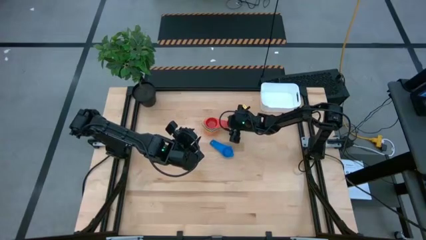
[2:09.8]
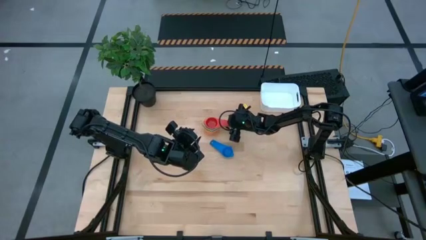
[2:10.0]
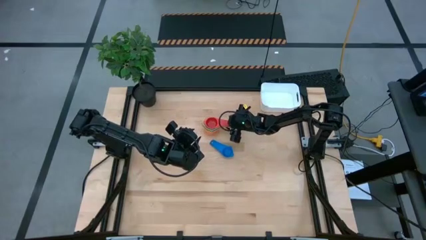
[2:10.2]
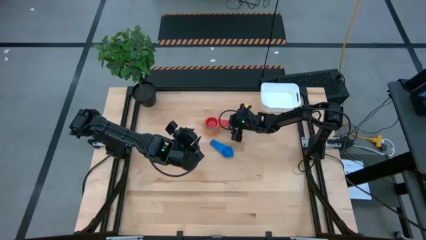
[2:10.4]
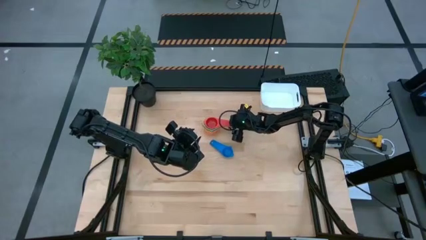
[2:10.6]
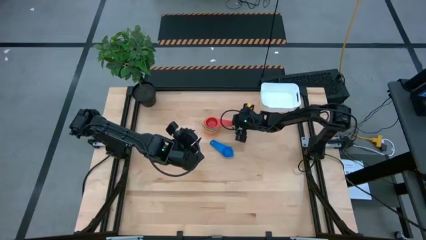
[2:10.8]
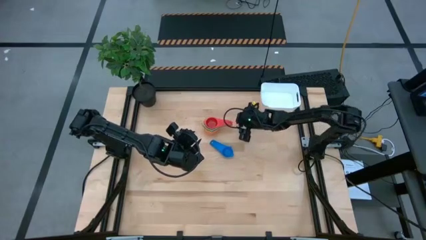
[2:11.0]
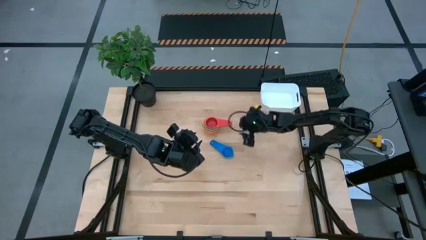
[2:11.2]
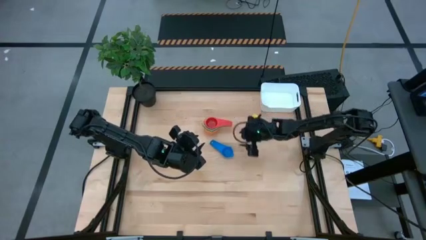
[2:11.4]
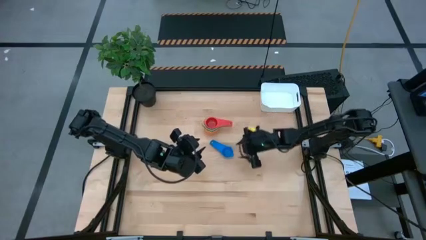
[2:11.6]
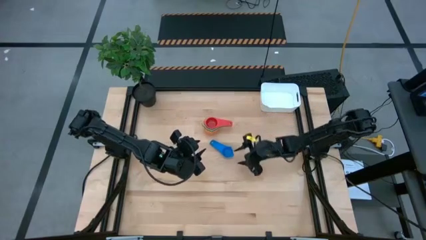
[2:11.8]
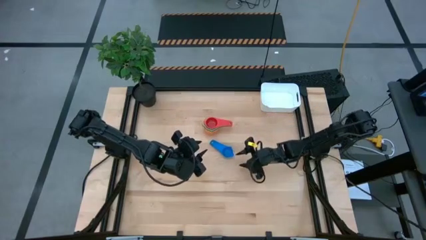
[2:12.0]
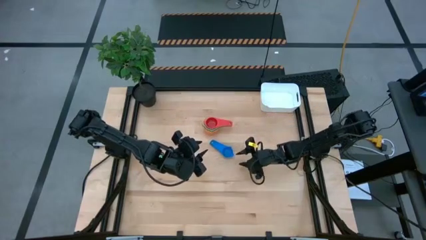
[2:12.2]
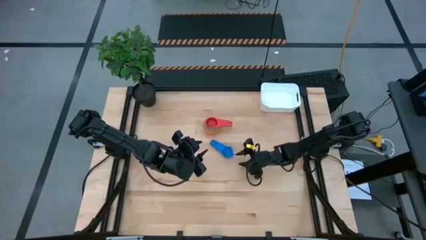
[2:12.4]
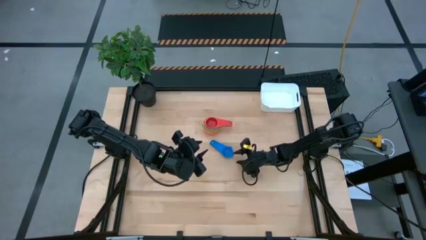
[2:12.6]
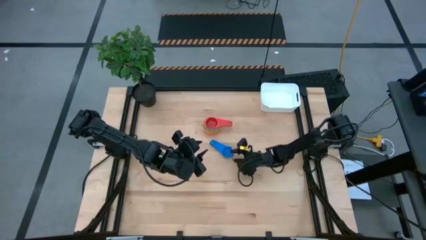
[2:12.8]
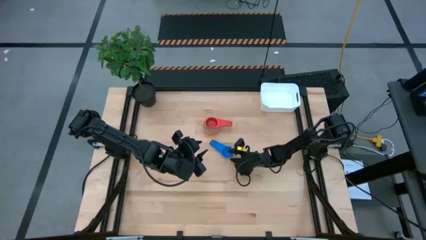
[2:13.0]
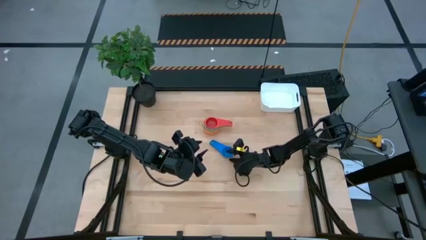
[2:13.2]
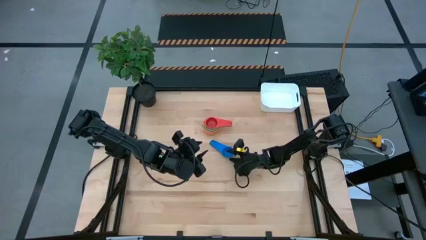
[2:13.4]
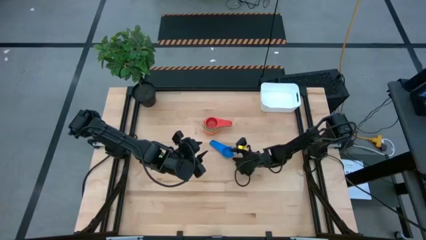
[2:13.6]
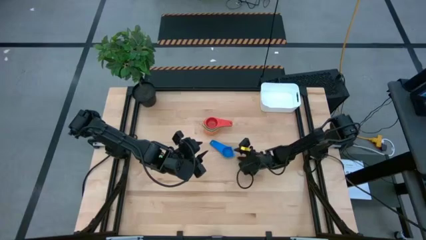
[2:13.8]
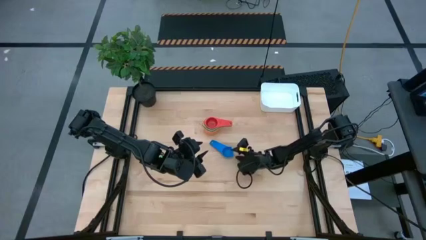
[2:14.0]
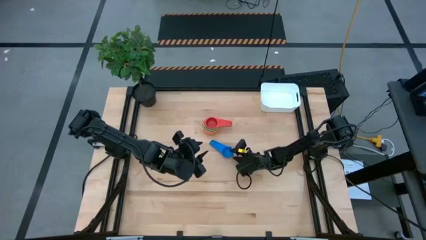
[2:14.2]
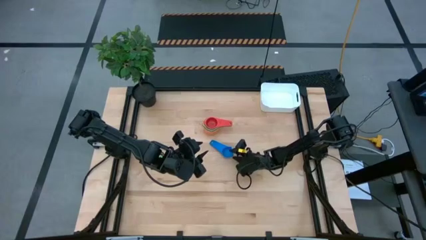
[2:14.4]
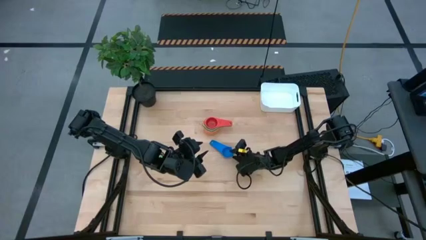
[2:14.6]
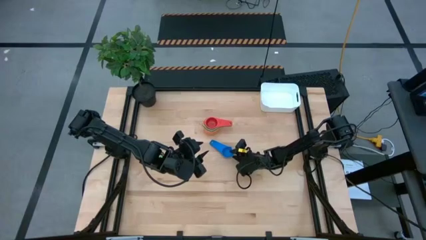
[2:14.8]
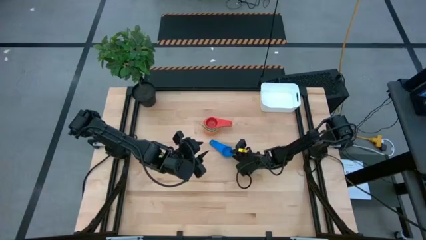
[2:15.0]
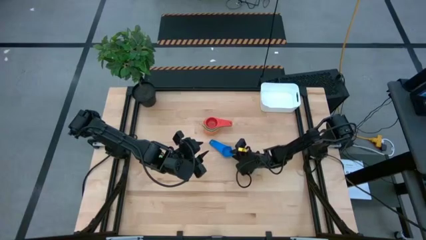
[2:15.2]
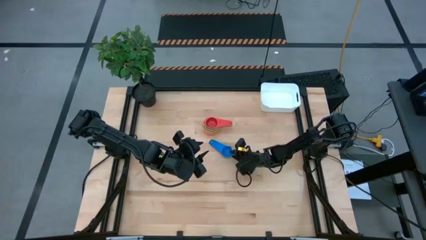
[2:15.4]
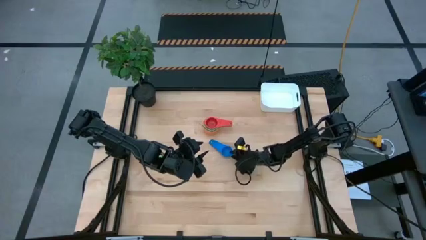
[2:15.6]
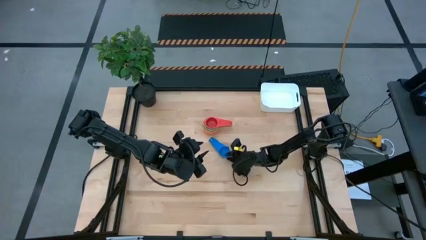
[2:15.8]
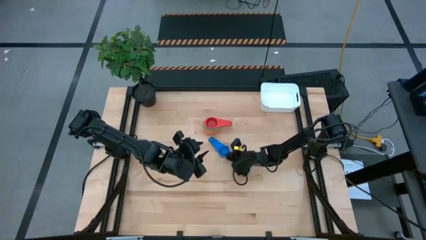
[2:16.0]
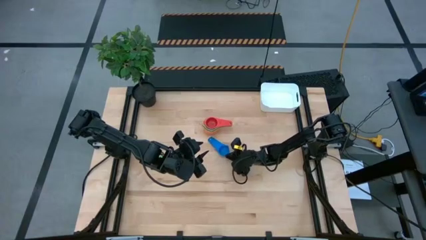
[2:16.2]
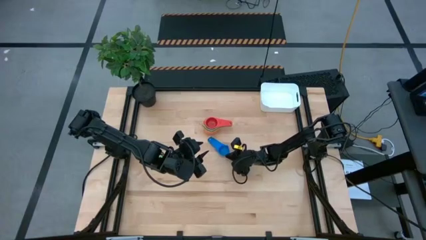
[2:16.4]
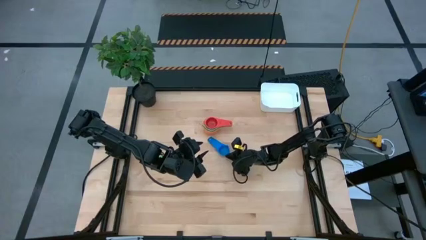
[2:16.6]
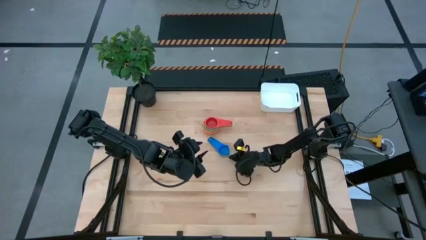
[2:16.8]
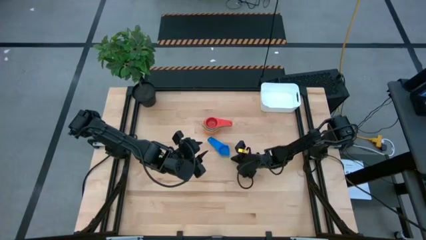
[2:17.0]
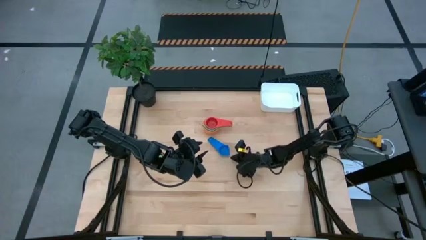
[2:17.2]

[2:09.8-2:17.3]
Task: Nest measuring cups in basket
Stack the blue measuring cup into the red measuring cup

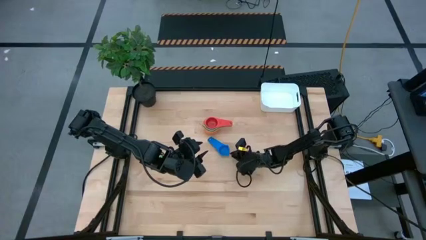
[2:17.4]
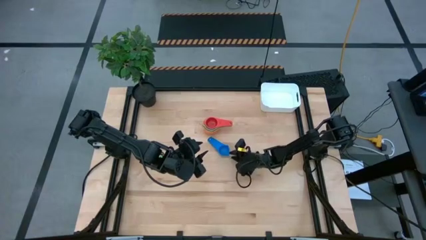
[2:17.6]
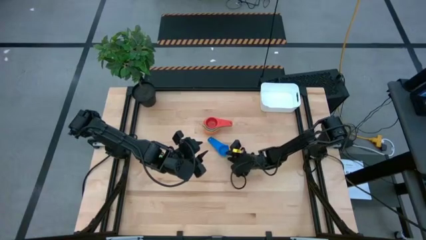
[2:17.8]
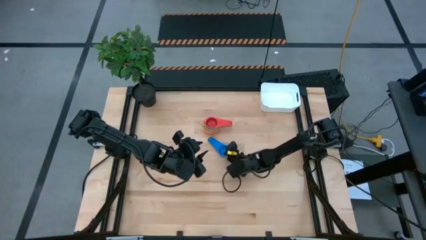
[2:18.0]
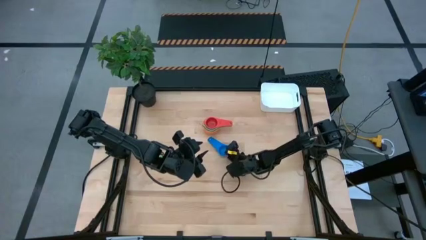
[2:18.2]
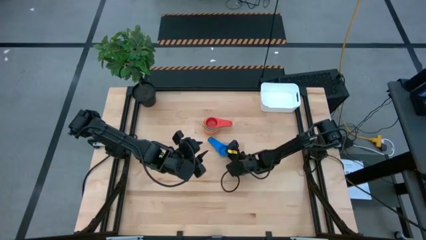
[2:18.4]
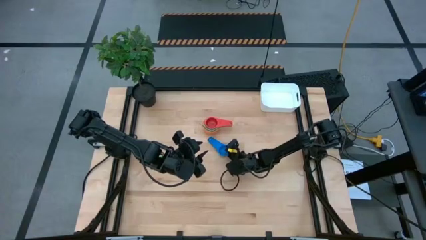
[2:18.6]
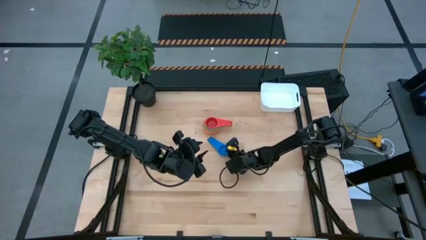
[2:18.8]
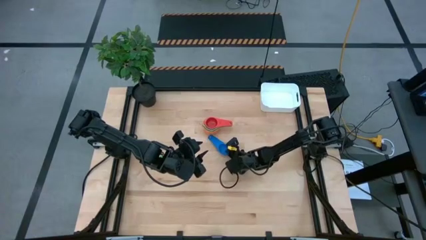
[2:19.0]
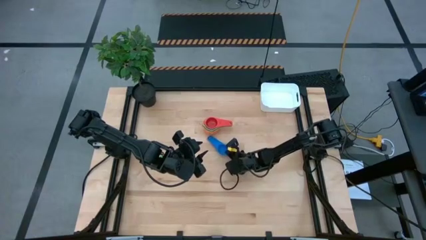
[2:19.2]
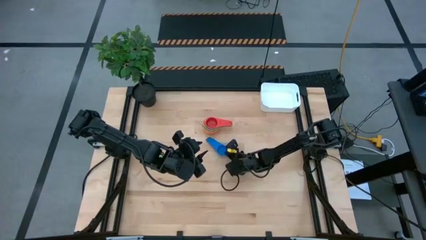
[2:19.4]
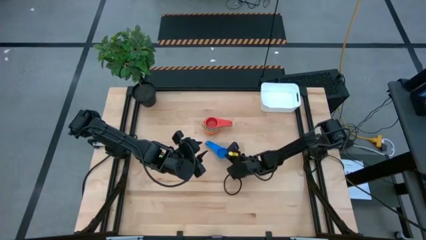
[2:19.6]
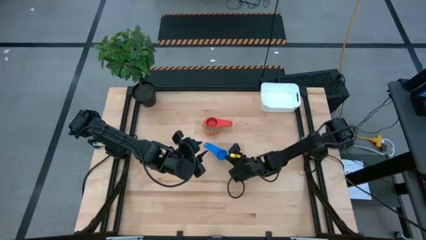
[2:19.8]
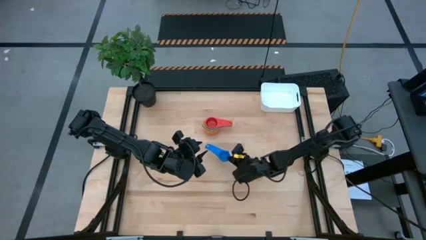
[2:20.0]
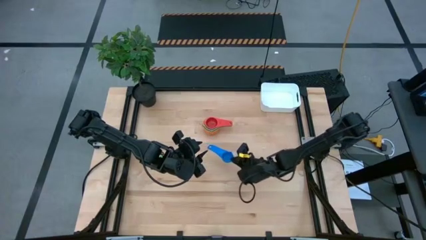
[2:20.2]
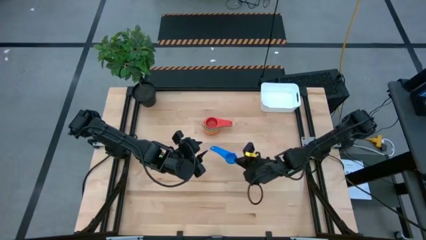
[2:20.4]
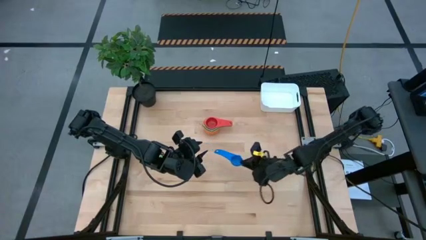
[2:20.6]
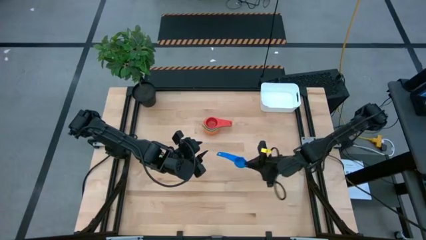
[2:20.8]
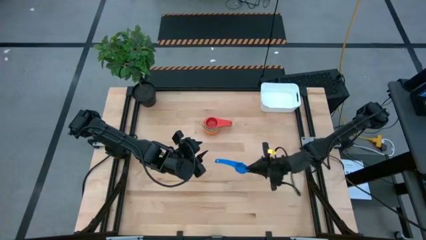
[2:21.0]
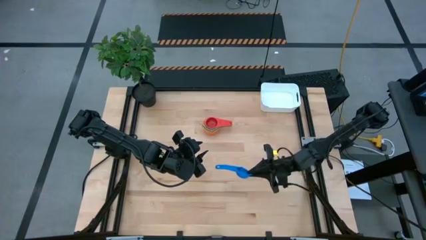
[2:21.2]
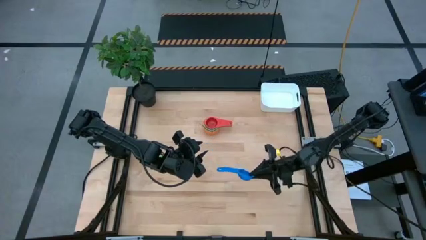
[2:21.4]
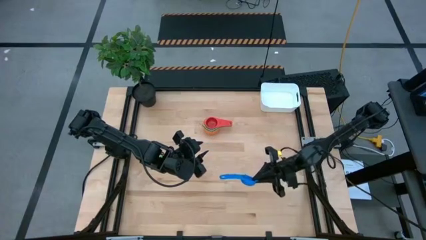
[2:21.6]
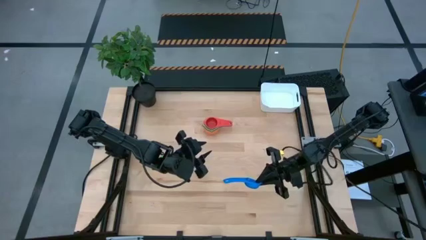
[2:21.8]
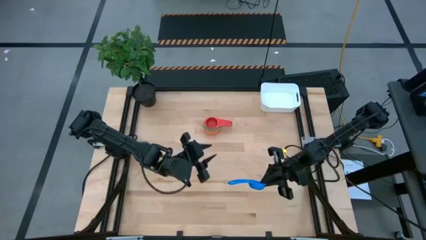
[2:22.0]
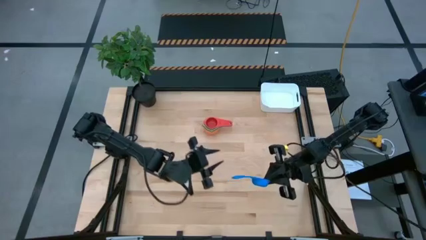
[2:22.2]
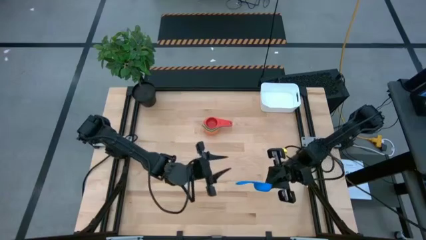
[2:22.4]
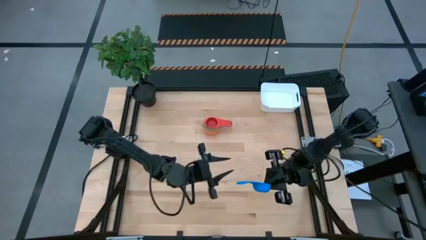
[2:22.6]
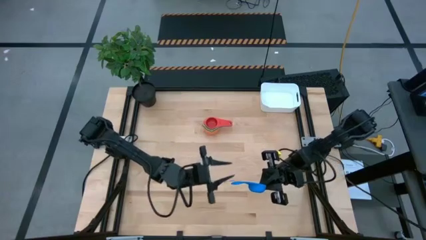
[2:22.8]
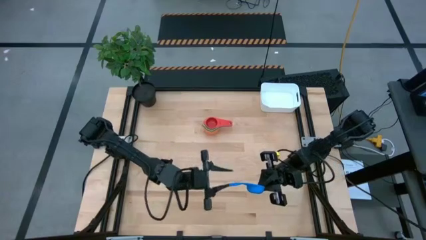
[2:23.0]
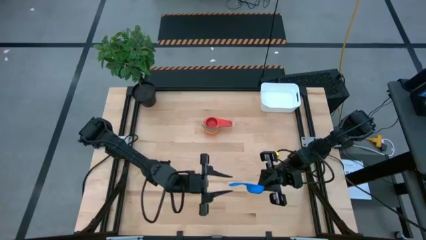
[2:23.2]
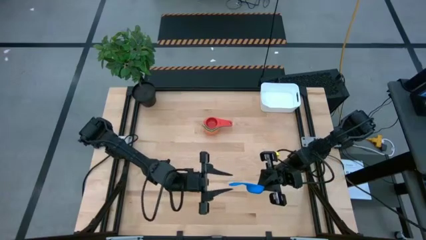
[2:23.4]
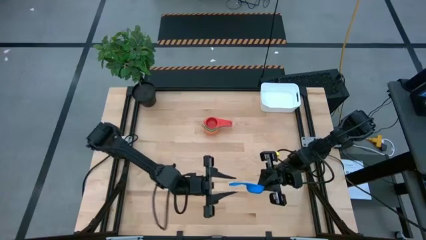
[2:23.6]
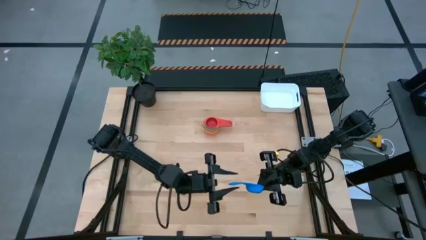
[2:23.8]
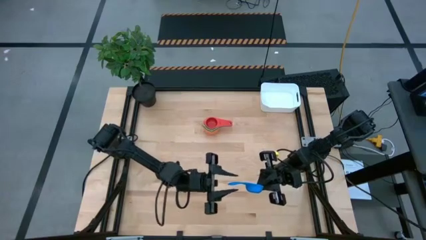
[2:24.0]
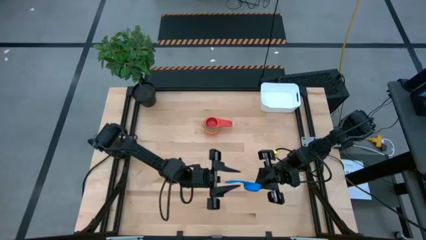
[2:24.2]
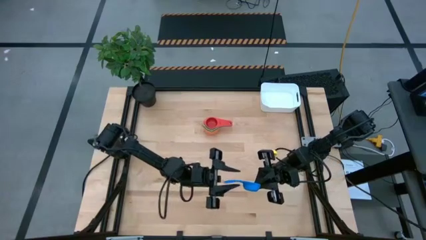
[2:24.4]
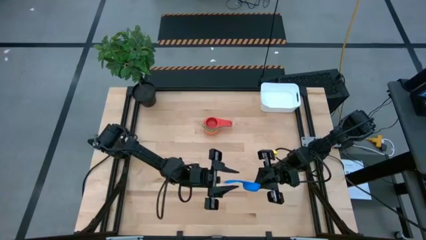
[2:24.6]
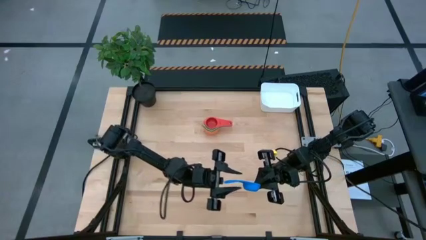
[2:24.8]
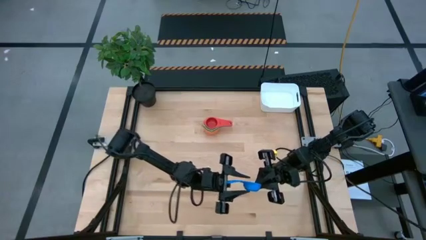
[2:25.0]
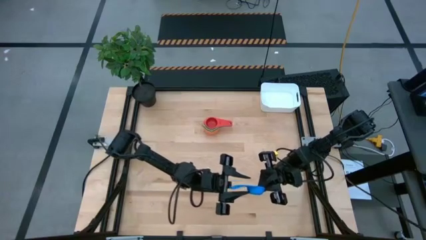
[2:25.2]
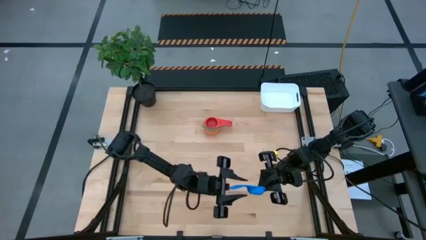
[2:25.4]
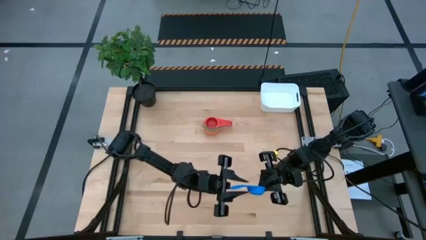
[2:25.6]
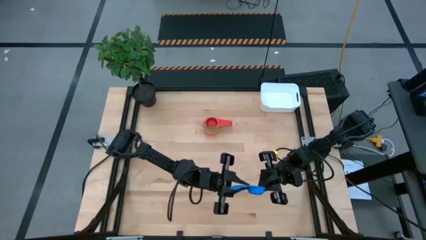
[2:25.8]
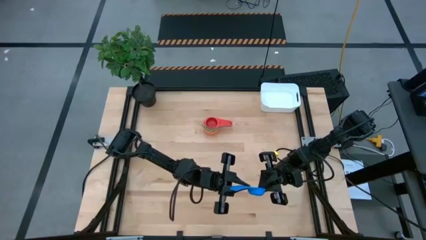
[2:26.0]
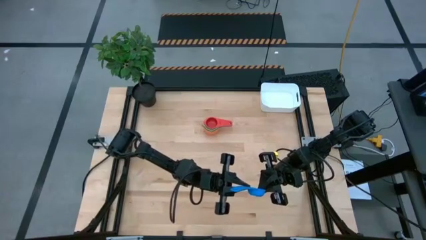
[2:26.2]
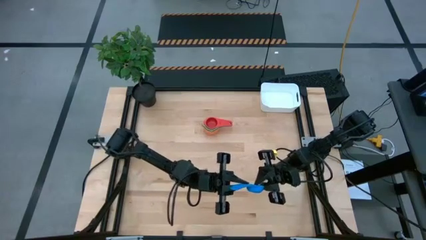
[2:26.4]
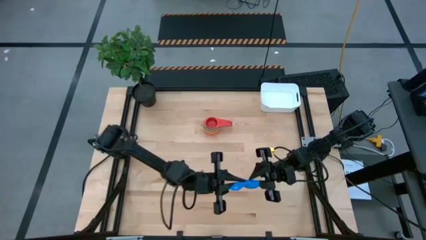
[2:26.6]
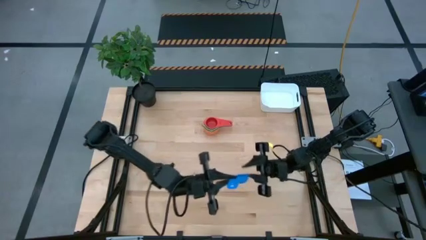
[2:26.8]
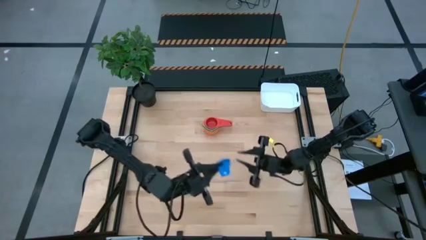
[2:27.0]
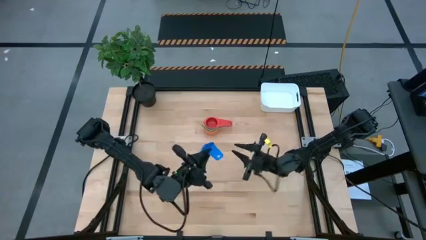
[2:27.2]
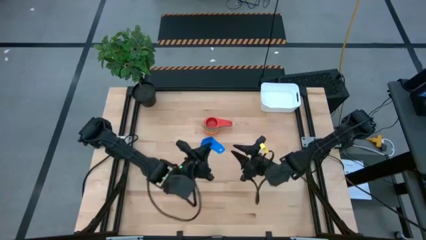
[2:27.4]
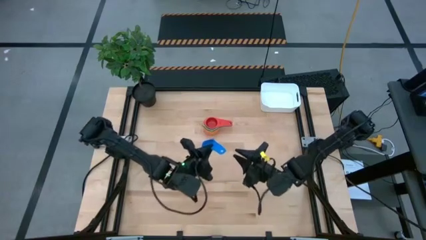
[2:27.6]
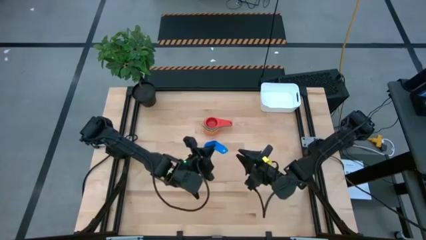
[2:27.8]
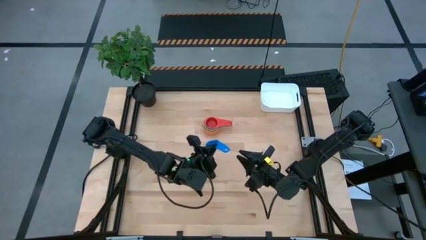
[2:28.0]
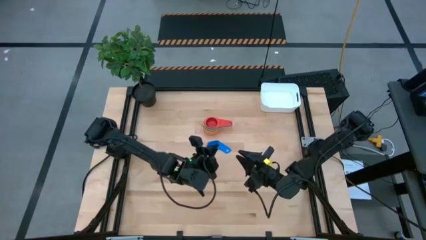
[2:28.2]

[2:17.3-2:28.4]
Stack the blue measuring cup into the red measuring cup
